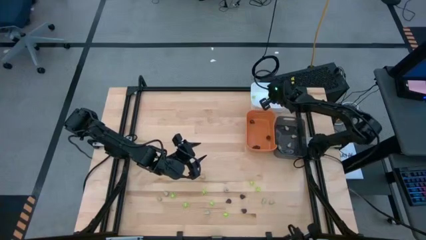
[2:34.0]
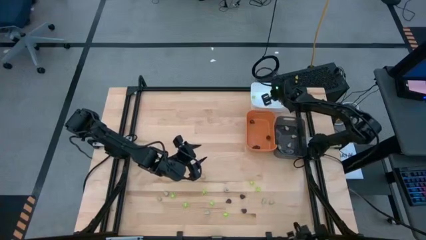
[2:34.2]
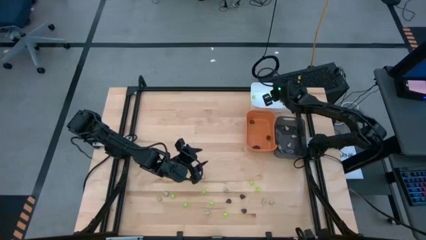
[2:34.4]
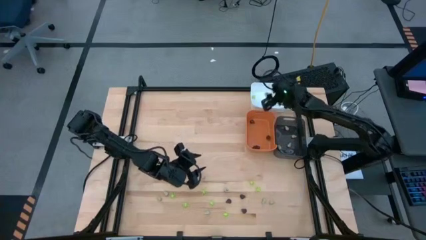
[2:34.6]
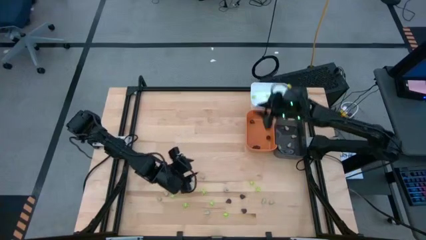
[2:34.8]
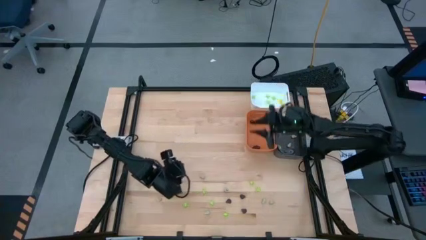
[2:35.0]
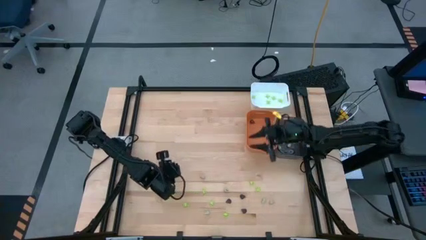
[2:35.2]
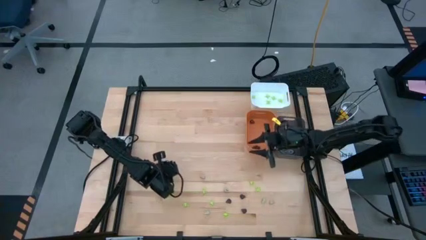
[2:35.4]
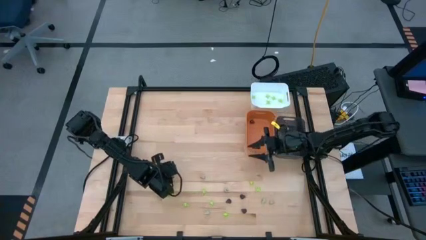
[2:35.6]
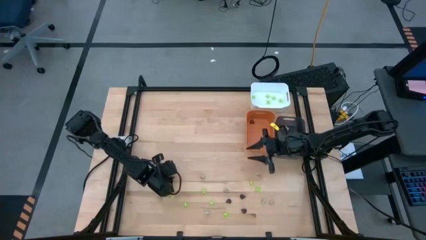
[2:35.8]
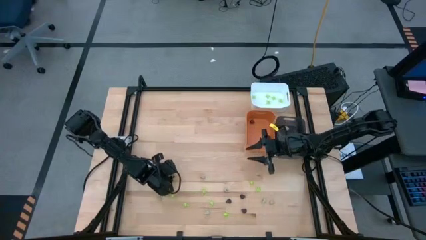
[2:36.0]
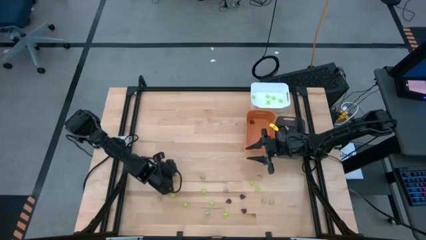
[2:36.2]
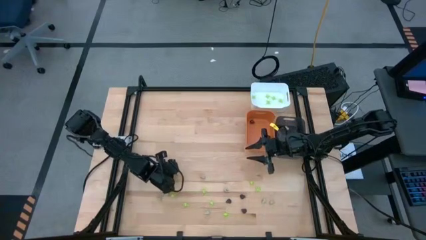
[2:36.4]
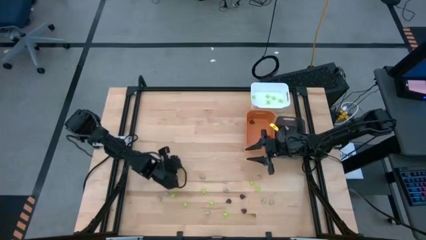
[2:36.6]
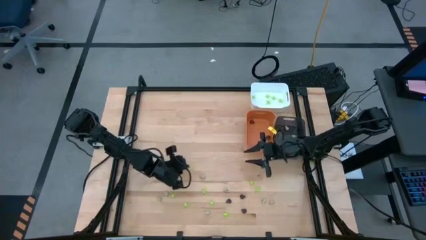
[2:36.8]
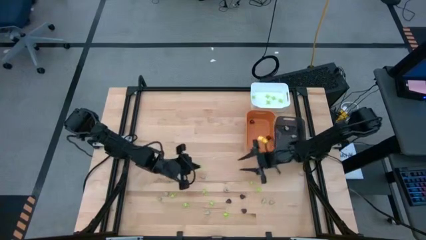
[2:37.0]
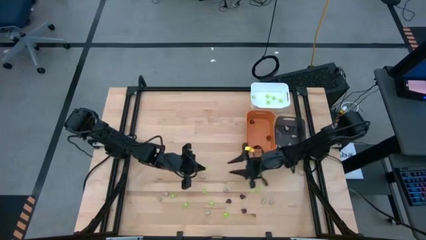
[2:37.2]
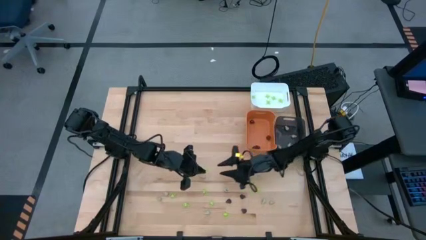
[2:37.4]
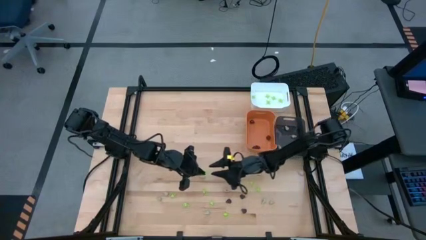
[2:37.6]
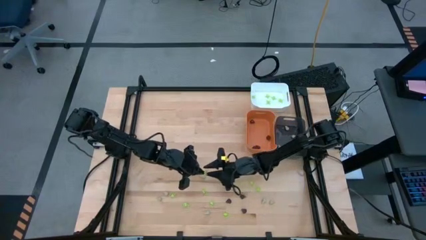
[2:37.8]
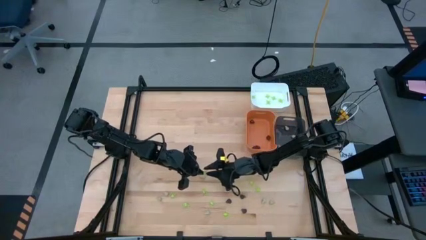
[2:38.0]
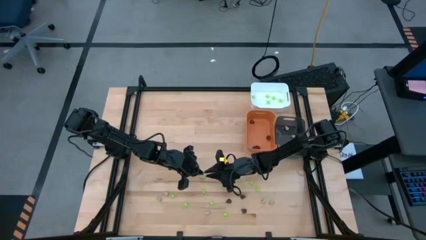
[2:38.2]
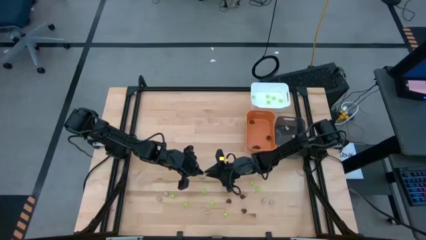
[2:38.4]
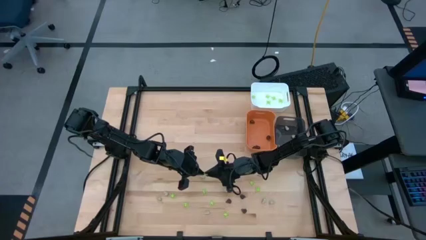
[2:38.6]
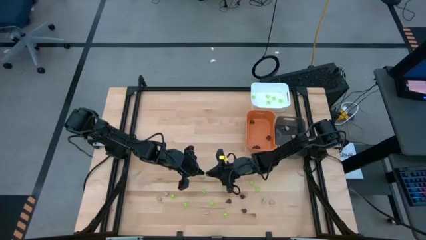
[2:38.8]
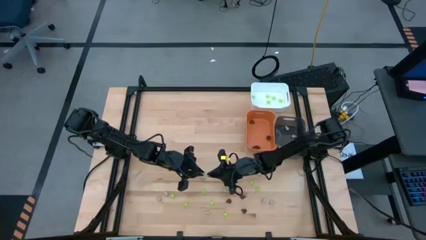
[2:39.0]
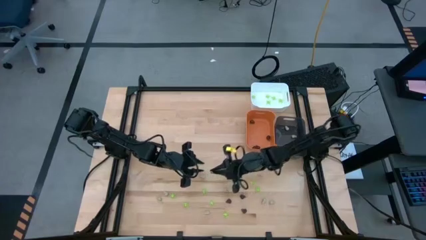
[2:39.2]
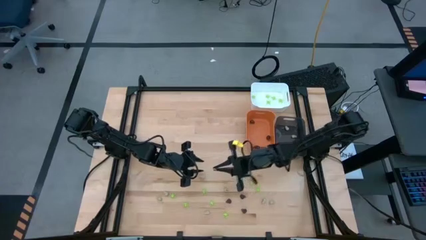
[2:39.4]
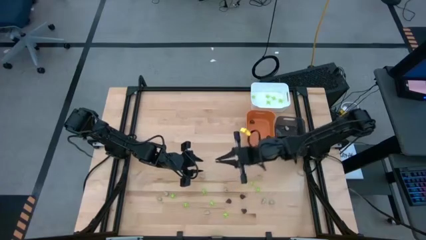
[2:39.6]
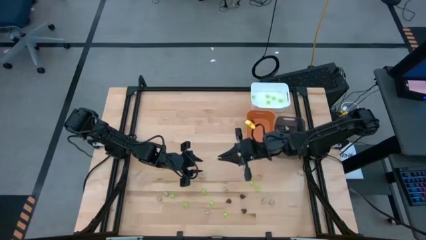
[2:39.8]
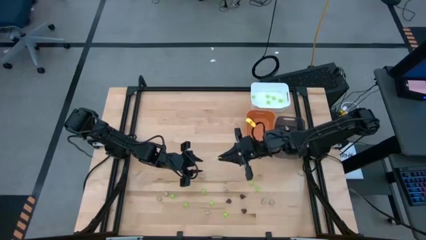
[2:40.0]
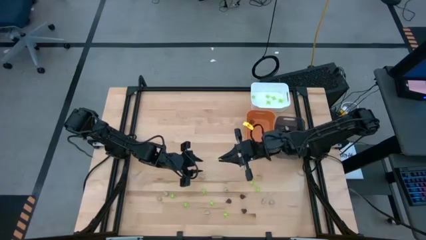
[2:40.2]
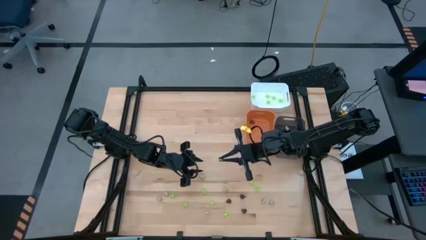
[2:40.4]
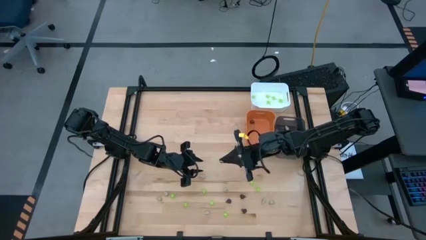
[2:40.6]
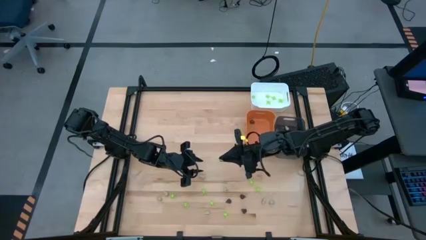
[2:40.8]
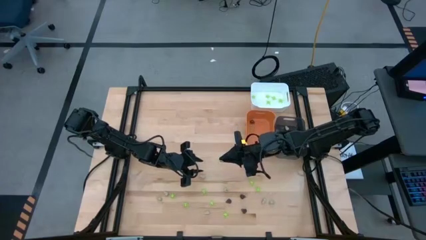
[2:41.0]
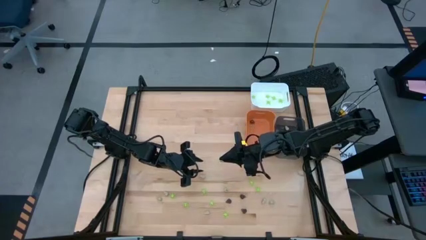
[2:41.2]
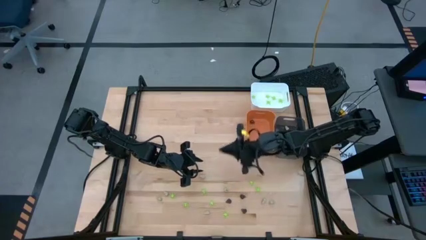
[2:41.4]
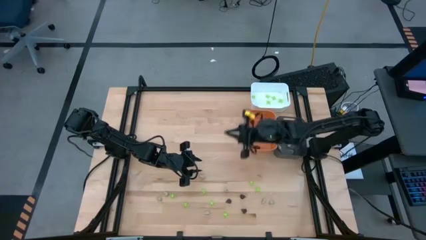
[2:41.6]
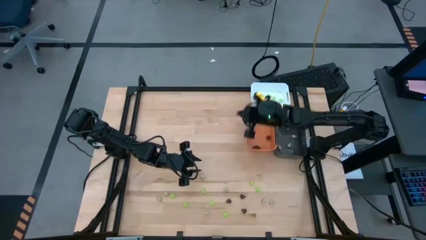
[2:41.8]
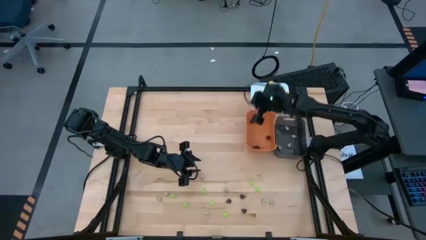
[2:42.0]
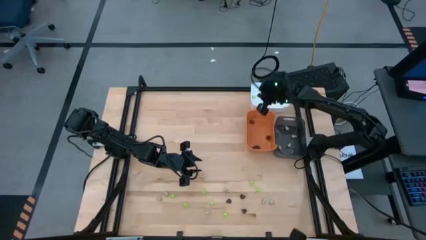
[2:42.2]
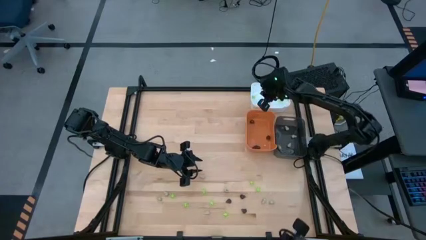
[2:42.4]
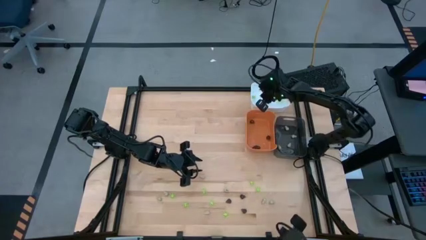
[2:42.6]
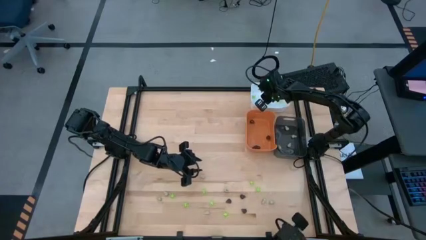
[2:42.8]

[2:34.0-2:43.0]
Task: Sort Halloween decoration
Put the green spider toy into the white bin

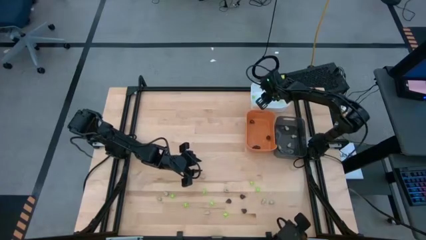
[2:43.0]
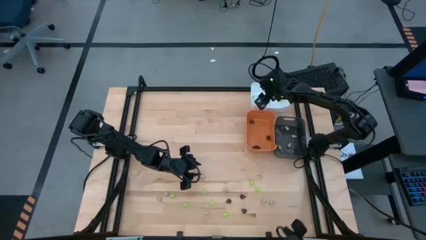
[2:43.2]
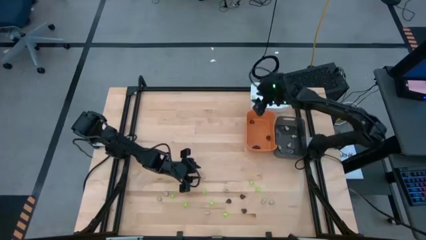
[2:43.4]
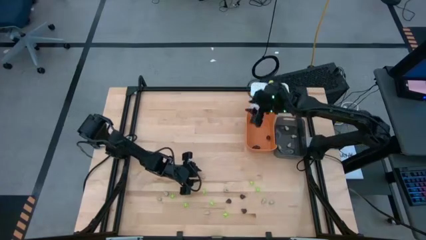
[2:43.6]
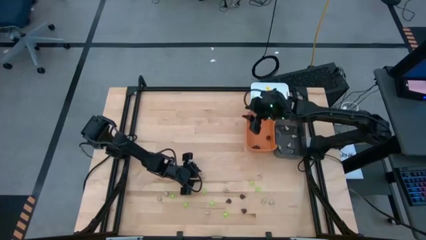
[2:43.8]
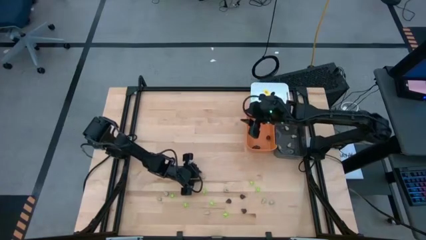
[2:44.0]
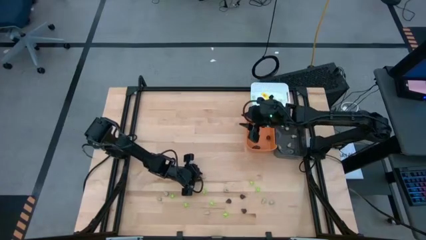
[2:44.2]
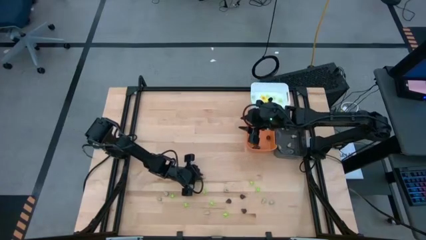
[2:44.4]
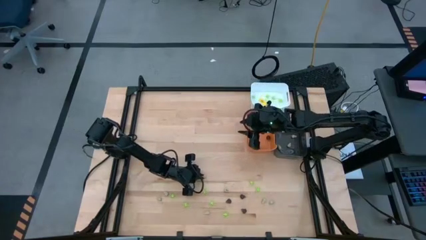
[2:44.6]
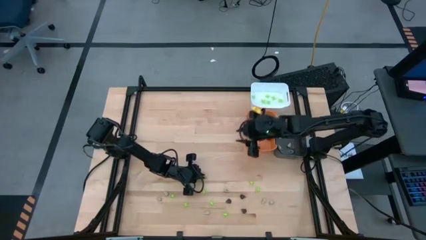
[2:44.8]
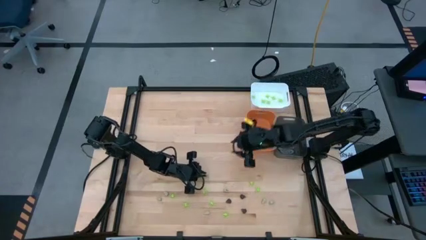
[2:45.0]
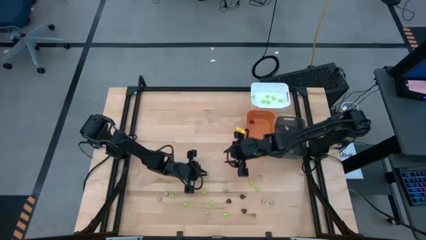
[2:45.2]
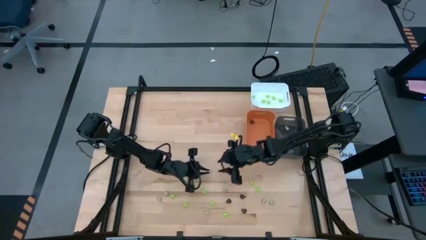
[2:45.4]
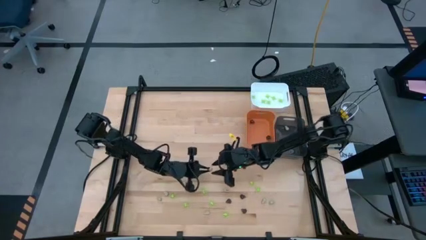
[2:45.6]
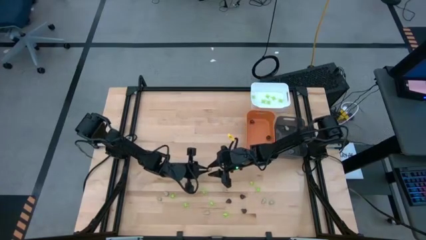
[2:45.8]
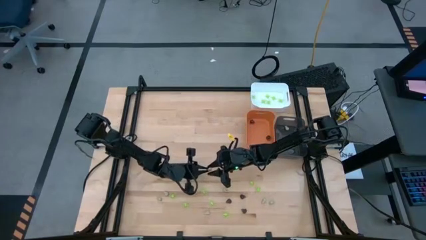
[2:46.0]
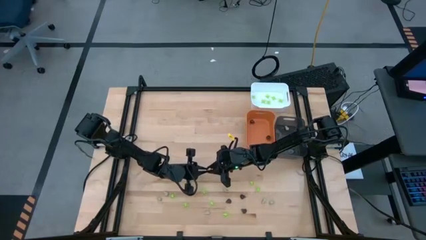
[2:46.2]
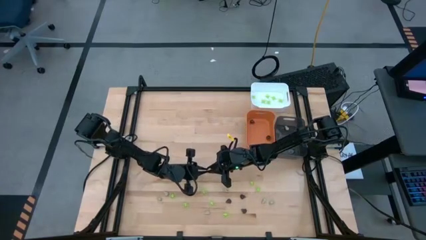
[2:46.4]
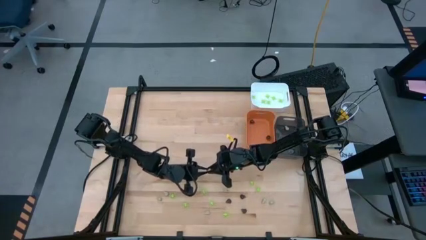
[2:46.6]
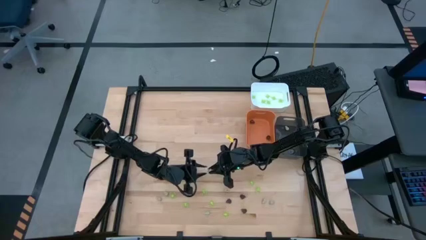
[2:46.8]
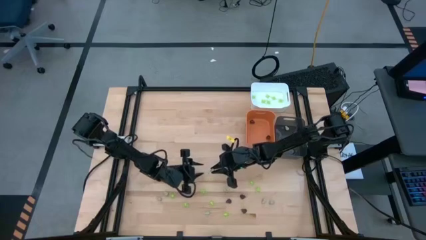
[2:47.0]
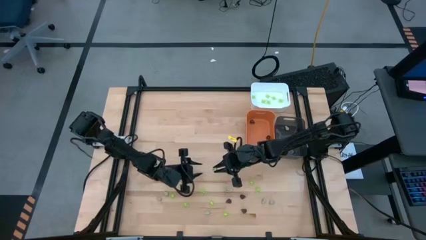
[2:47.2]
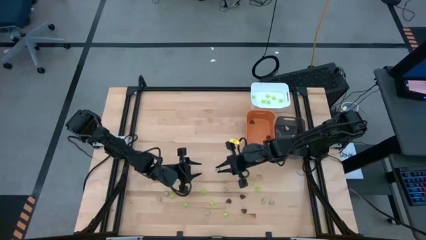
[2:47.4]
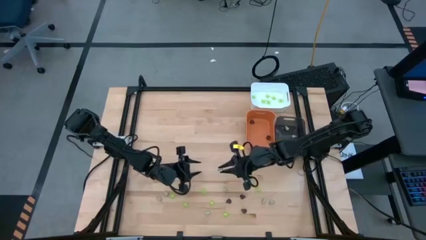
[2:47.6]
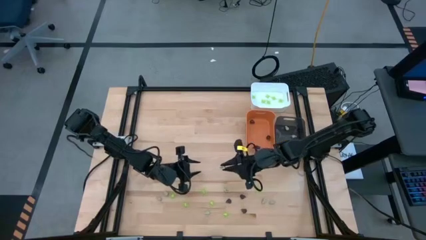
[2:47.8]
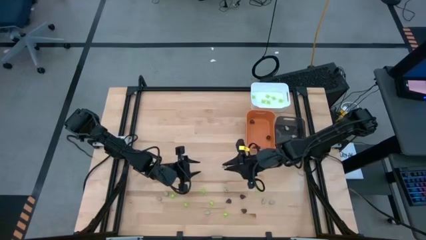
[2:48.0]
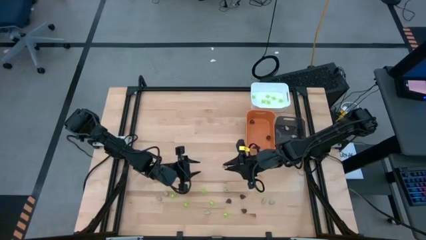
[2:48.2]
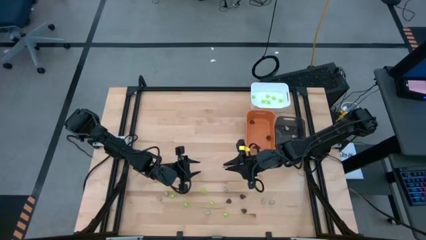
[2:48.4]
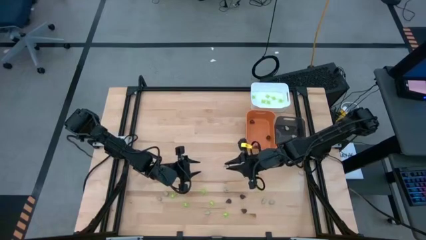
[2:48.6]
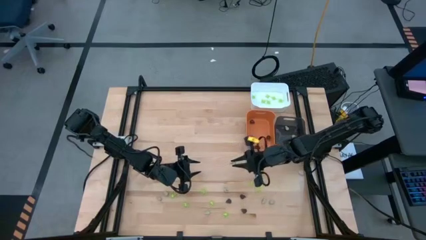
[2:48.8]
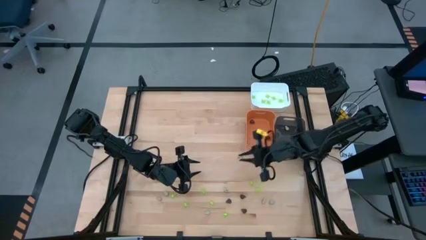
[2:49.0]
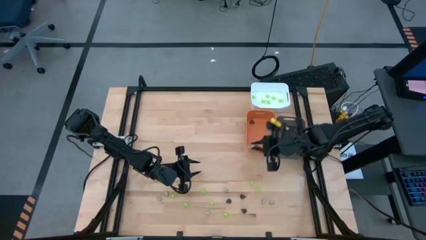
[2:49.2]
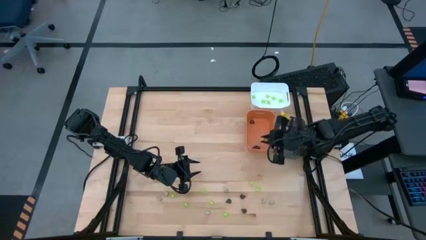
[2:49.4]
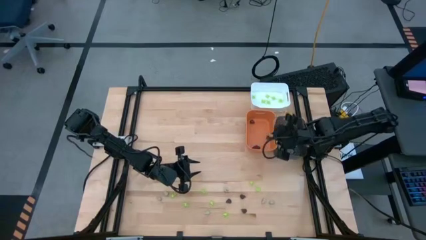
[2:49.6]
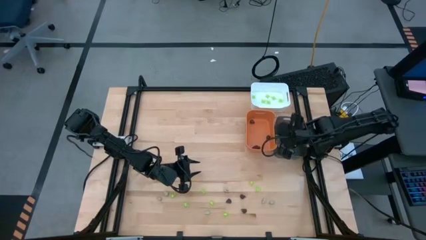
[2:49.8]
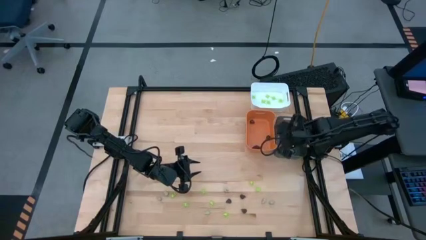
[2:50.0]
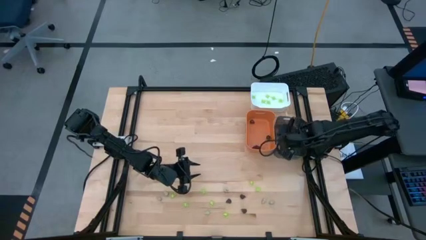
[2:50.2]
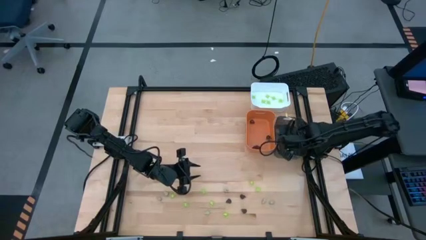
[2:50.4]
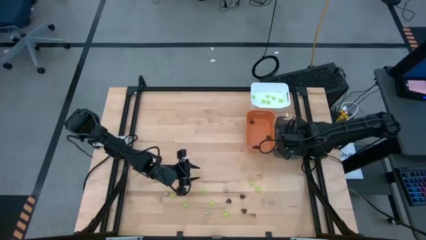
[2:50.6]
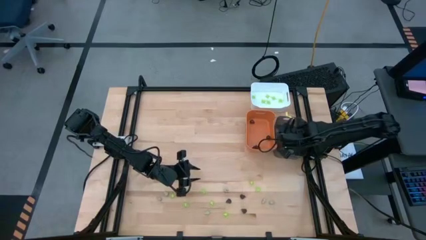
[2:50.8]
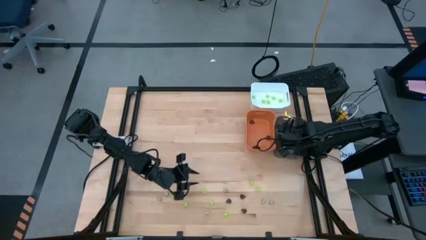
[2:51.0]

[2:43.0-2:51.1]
Put the white skull toy into the black bin
